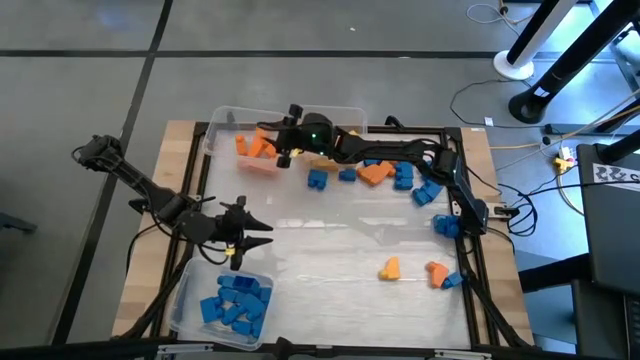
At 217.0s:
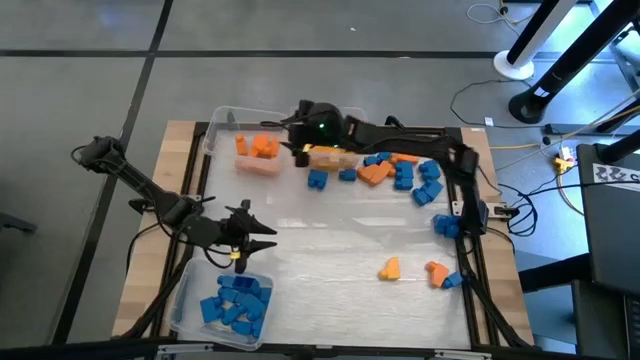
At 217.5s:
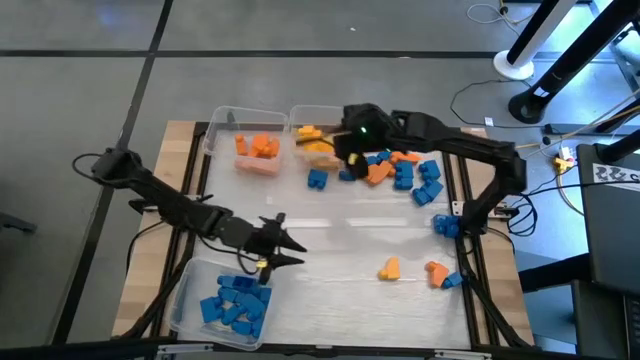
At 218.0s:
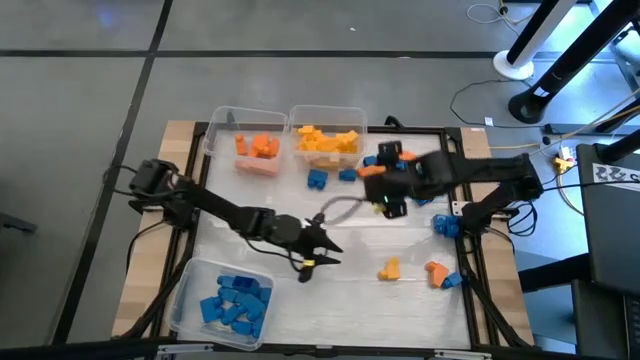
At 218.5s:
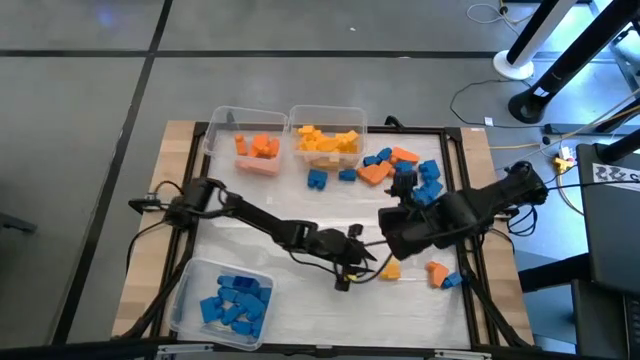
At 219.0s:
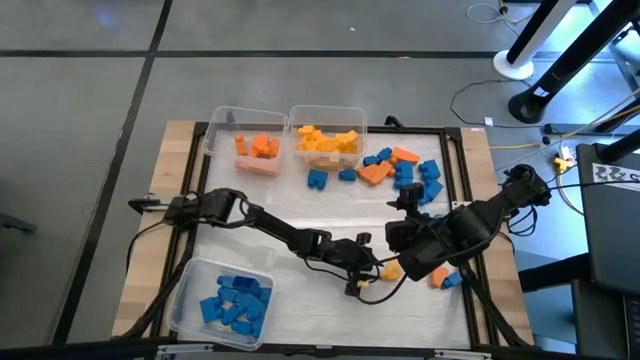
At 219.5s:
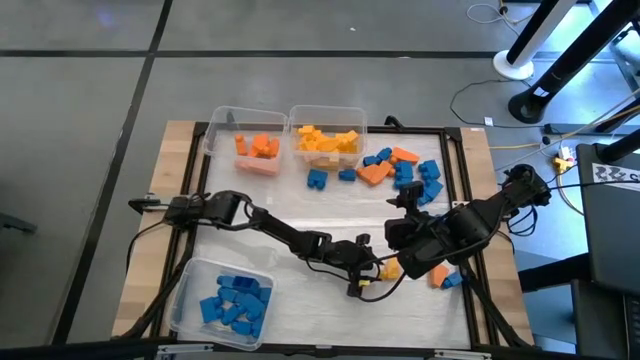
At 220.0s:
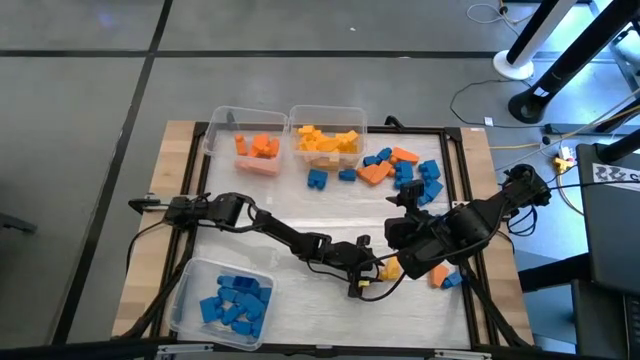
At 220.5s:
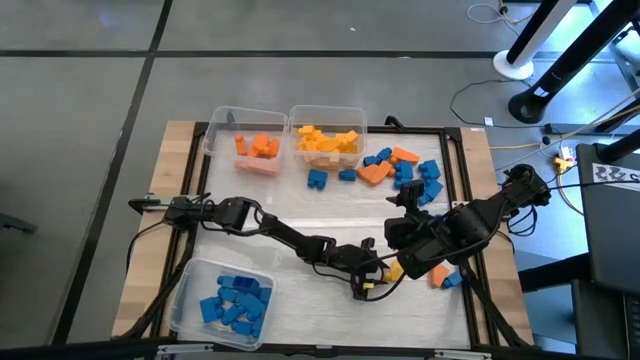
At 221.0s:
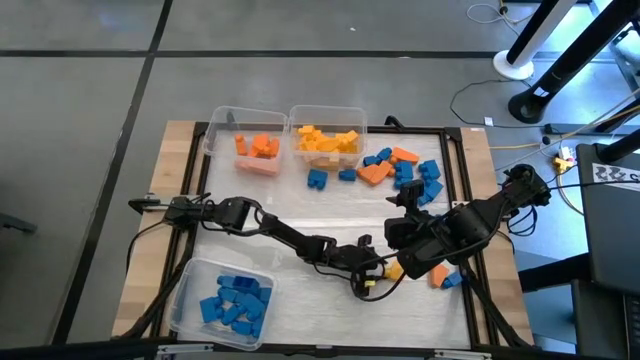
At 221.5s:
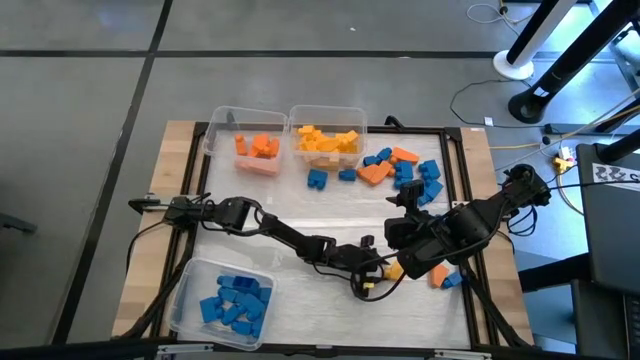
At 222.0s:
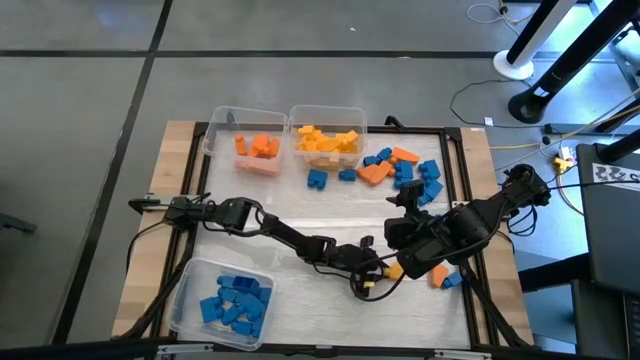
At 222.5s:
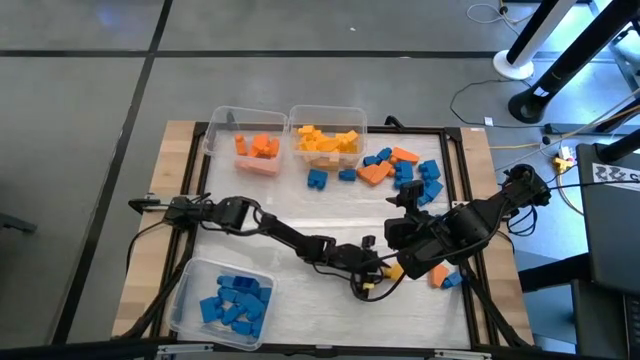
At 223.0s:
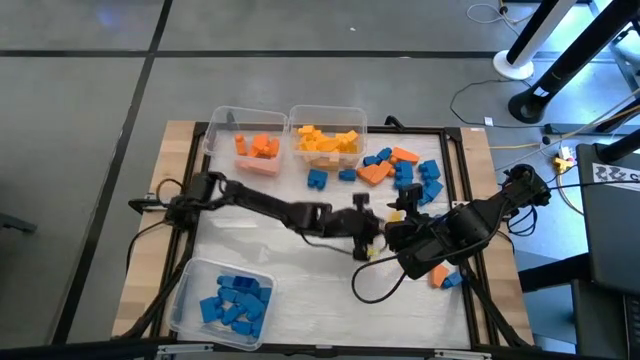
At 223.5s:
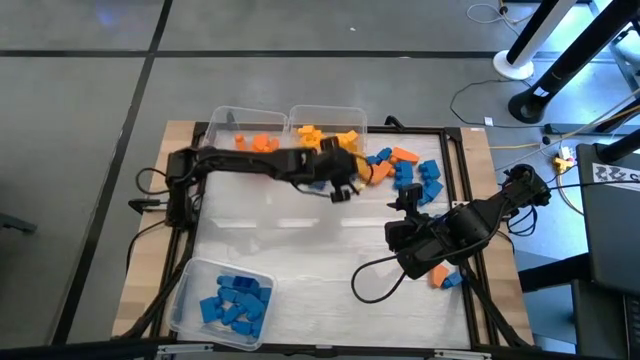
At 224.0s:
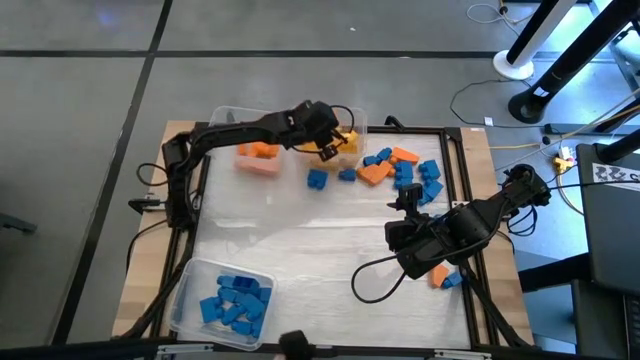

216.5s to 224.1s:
Task: Sort blocks
Put the yellow game piece into the top right transparent bin

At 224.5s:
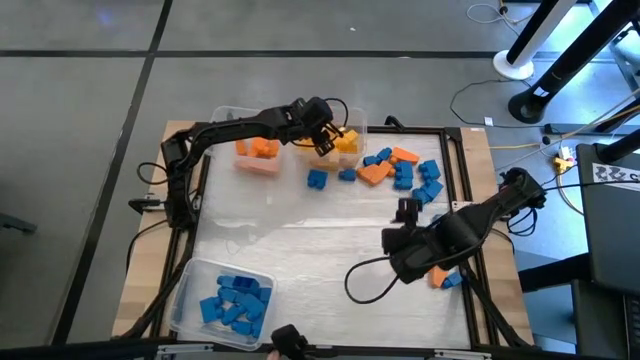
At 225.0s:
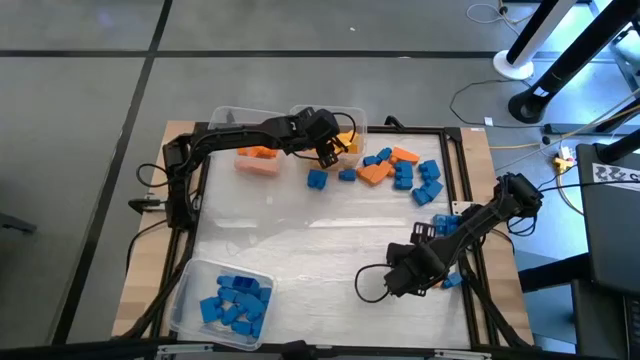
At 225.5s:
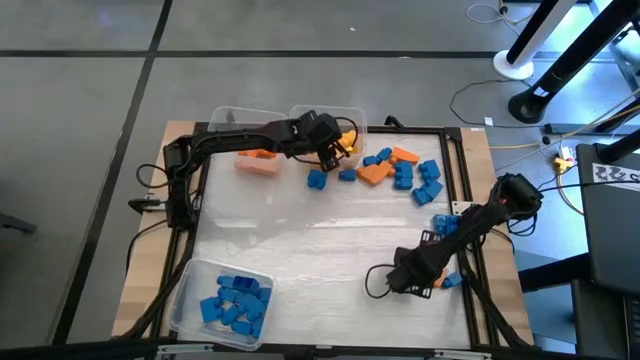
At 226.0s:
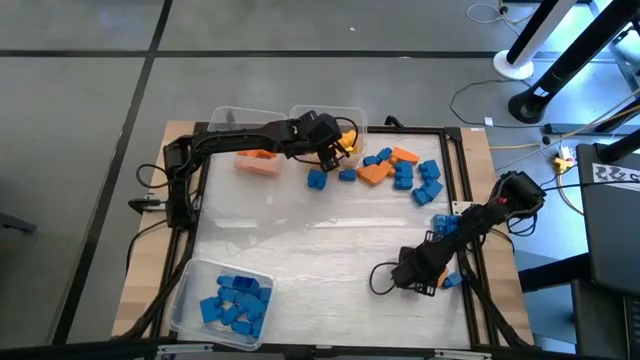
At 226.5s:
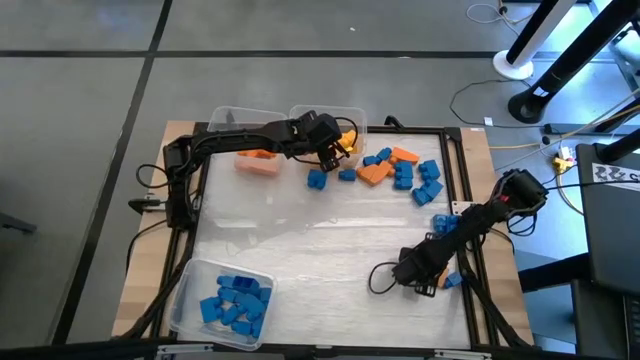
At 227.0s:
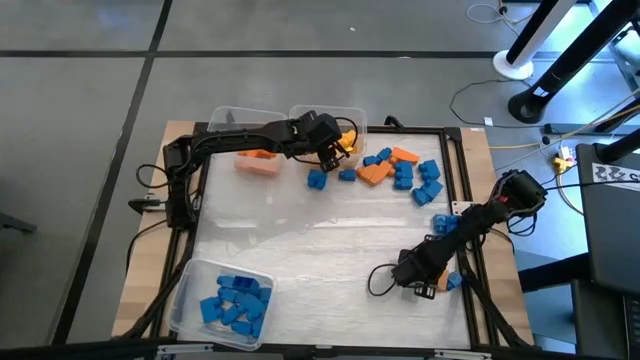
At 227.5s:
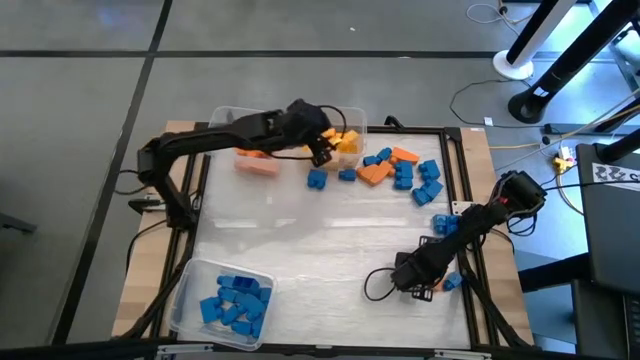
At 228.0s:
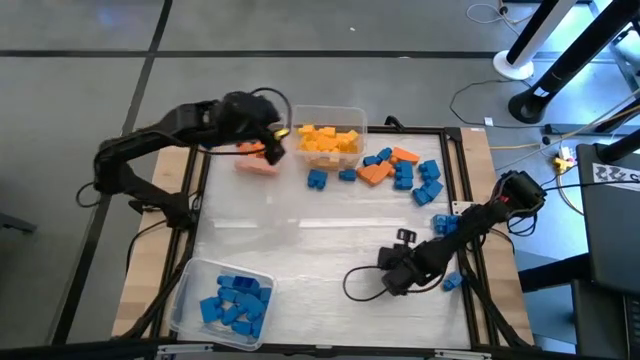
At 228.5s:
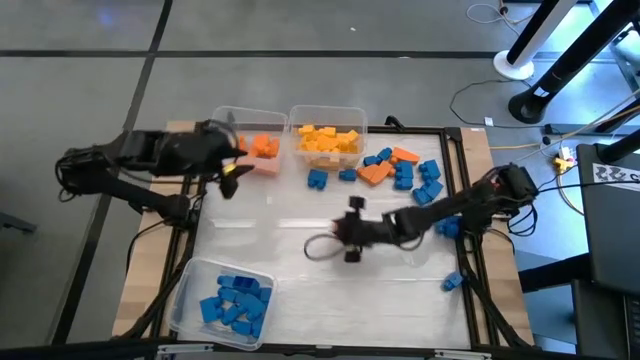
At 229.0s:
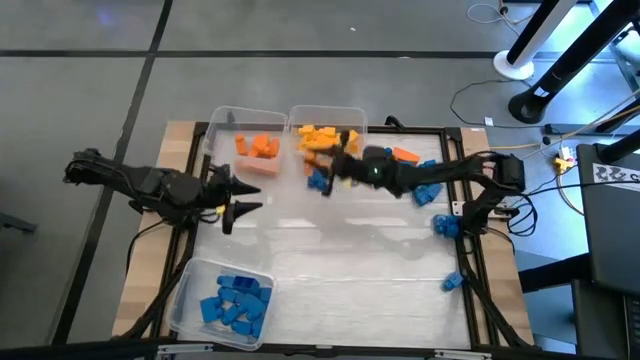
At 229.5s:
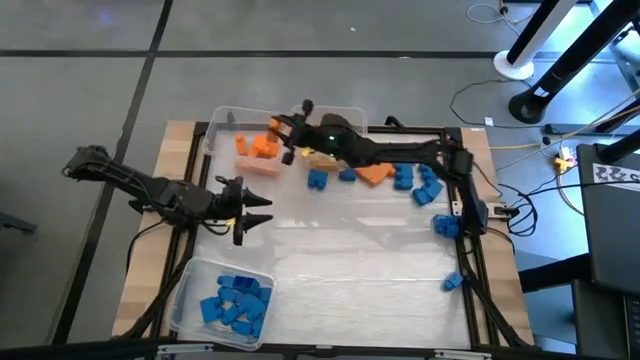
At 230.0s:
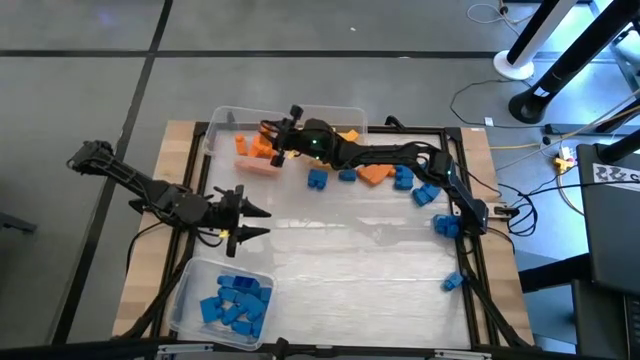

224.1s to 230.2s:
Put the orange game piece into the top left transparent bin

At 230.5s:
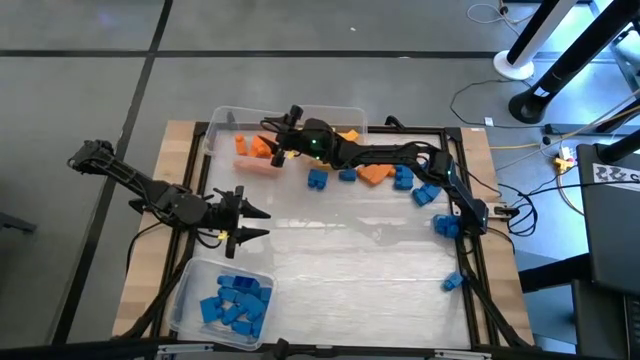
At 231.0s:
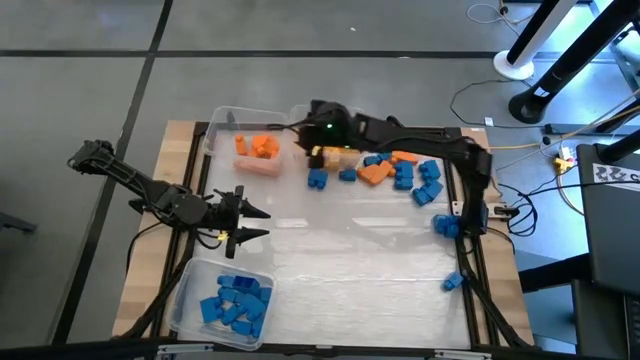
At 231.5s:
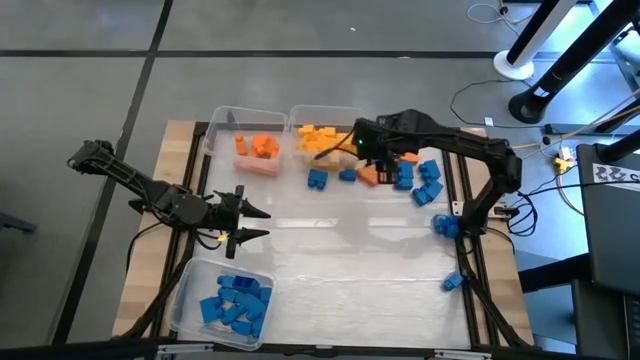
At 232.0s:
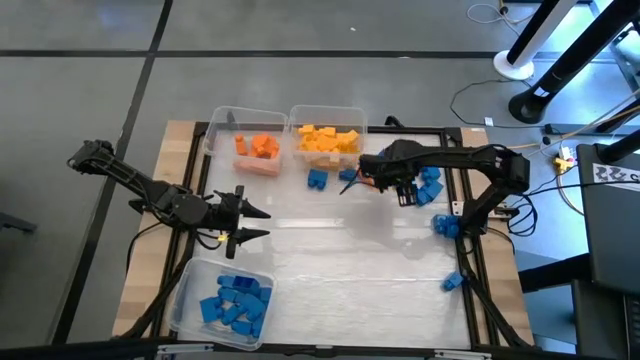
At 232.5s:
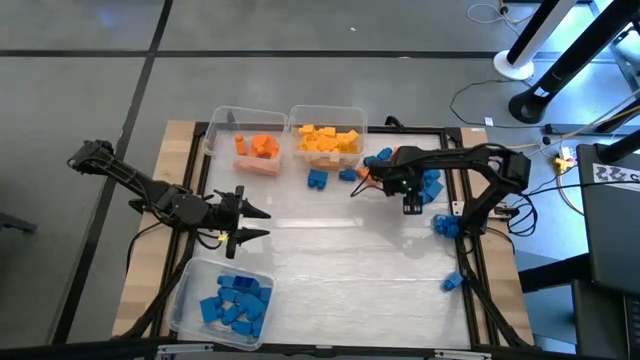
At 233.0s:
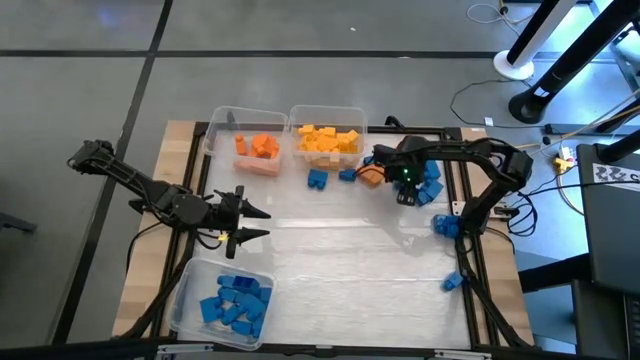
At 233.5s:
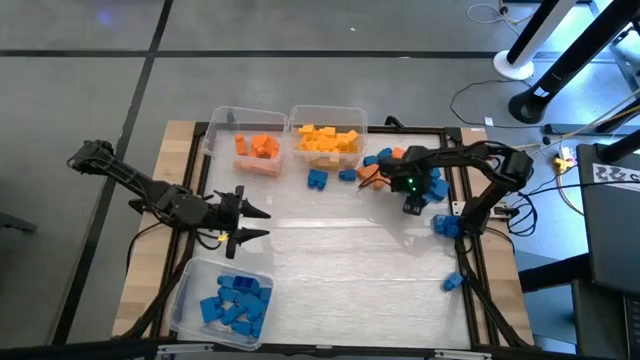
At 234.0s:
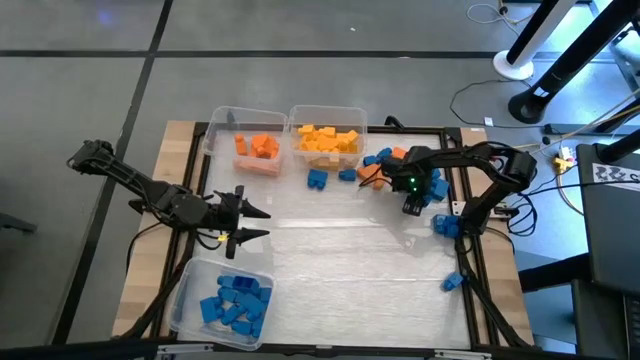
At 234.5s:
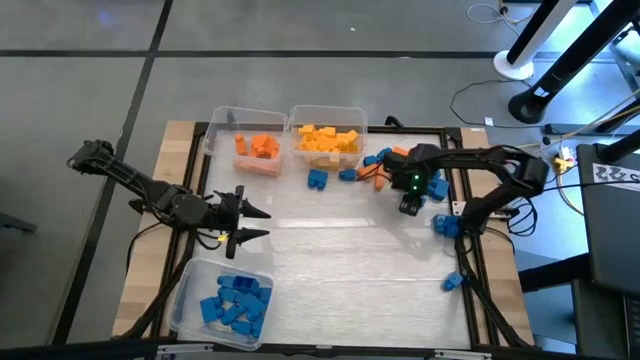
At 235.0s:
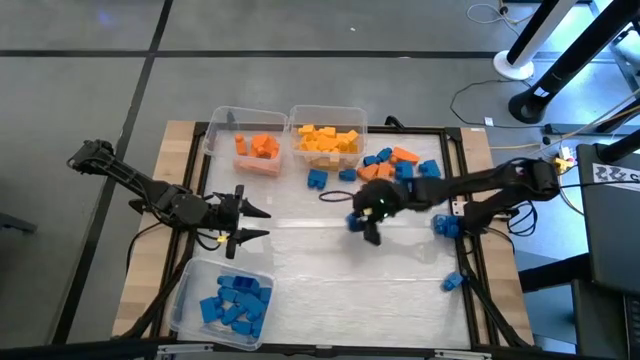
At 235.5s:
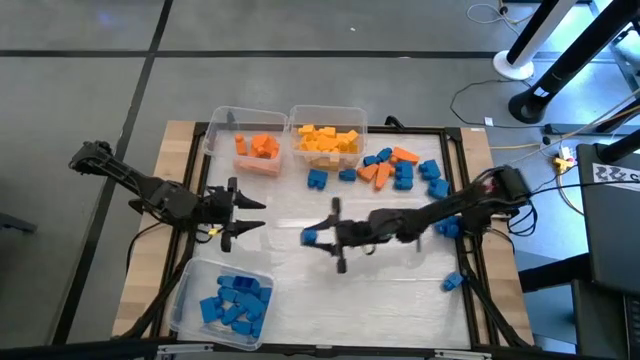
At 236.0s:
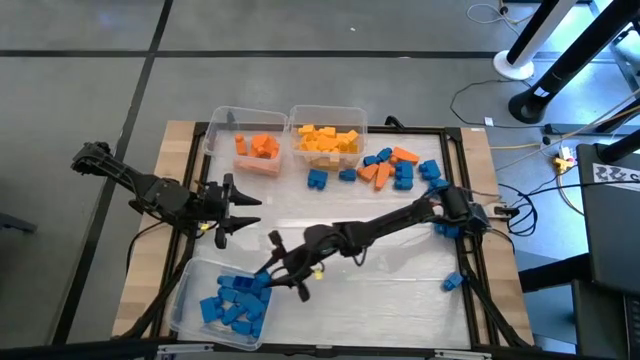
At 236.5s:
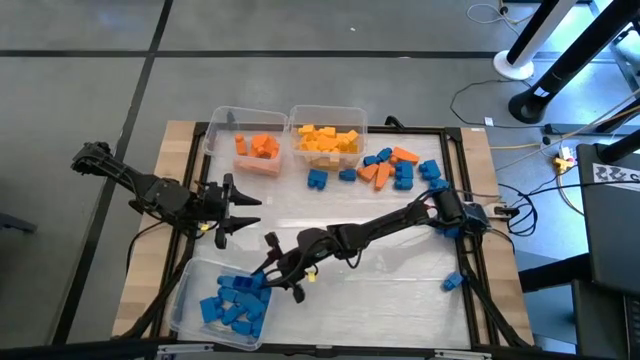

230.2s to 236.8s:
Put the blue game piece into the bottom transparent bin

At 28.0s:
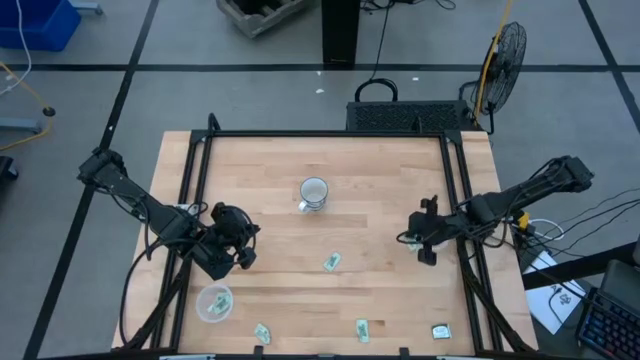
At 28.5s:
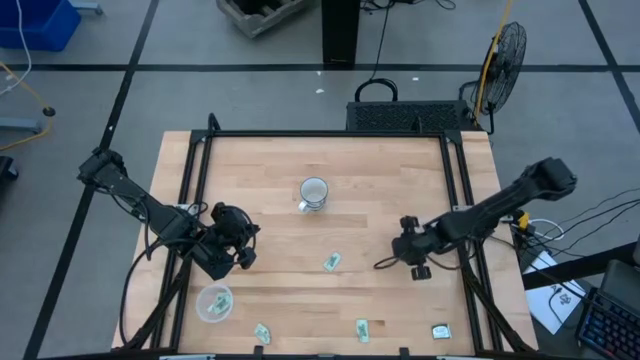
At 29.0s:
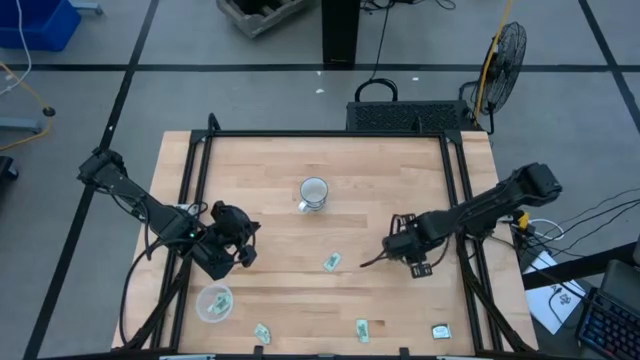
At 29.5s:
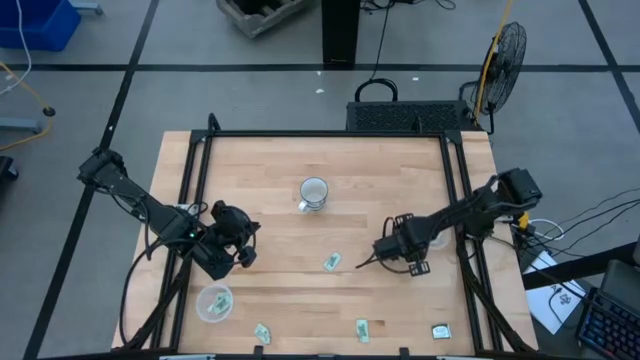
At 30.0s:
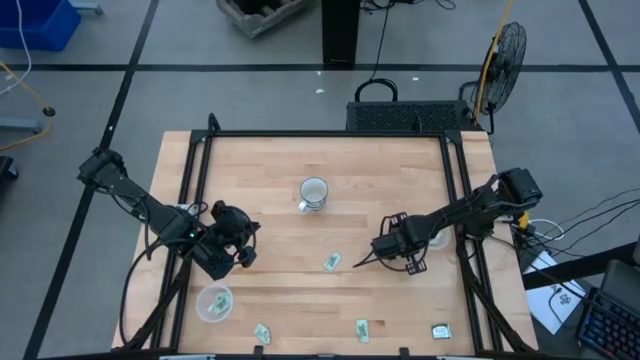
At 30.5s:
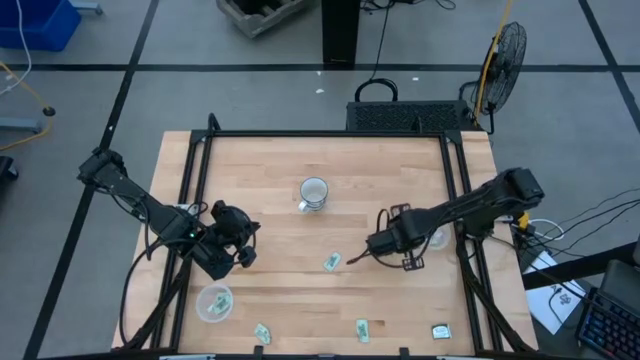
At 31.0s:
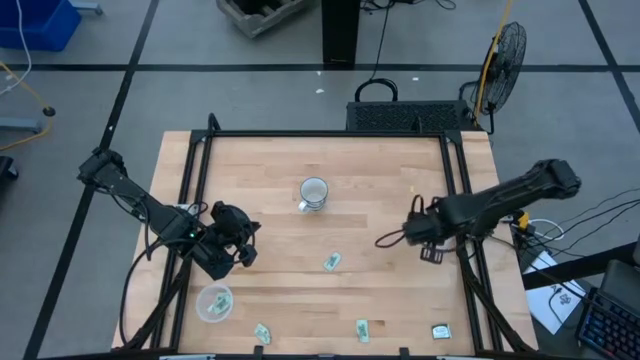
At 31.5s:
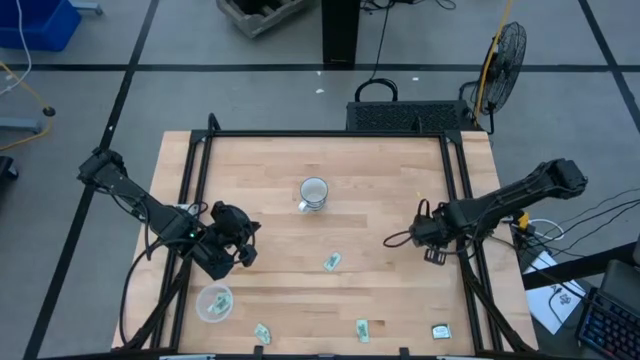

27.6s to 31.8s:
Task: Pick and place Stevia / Truvia into bins
Put the green stevia packet into the right transparent container
